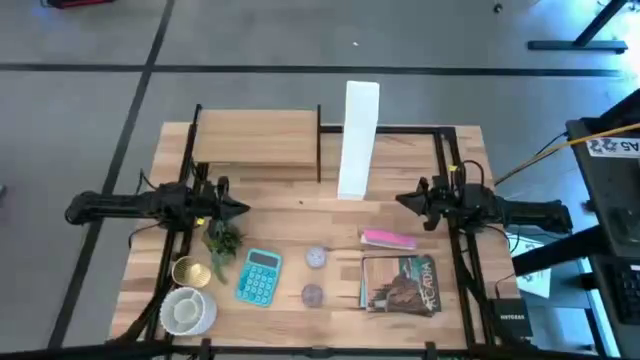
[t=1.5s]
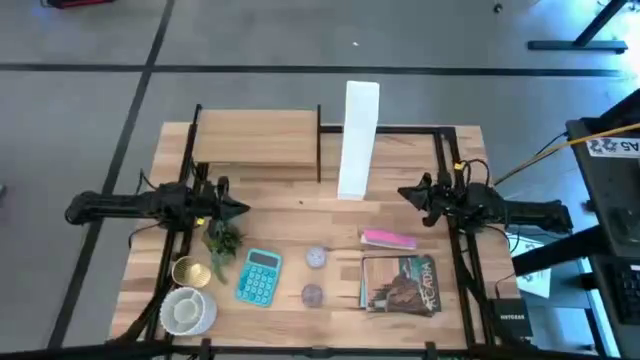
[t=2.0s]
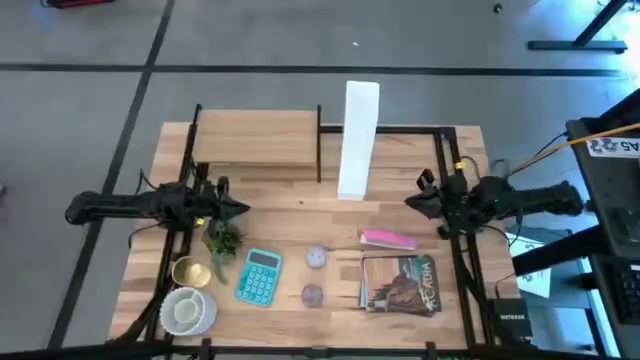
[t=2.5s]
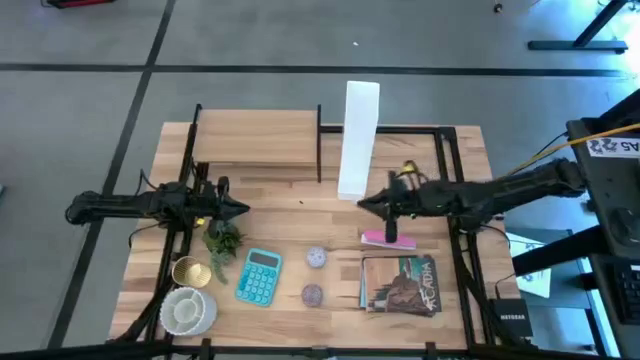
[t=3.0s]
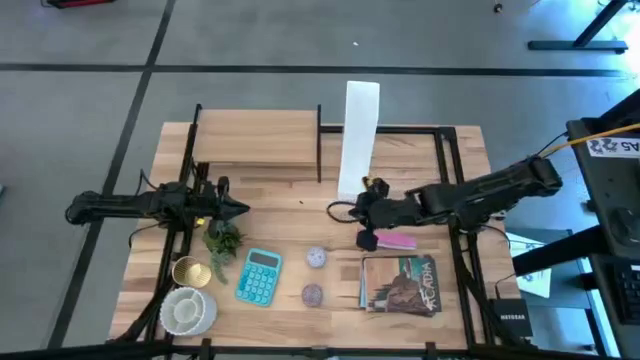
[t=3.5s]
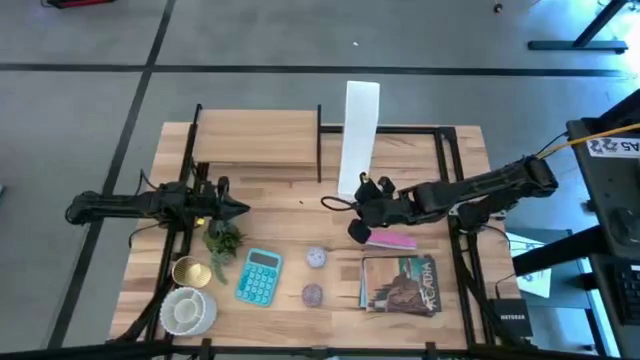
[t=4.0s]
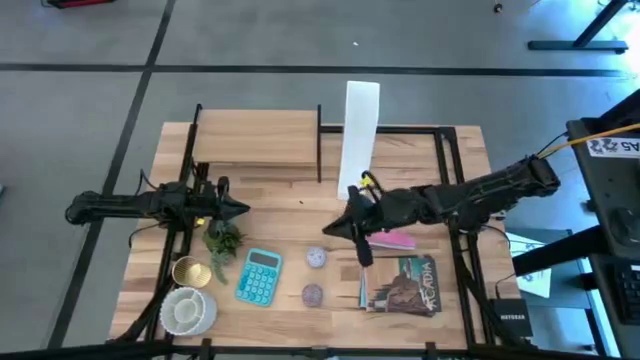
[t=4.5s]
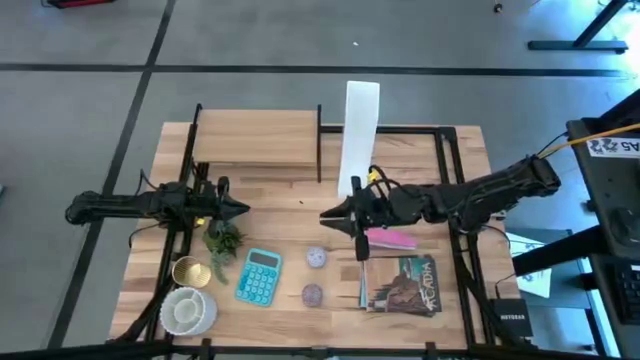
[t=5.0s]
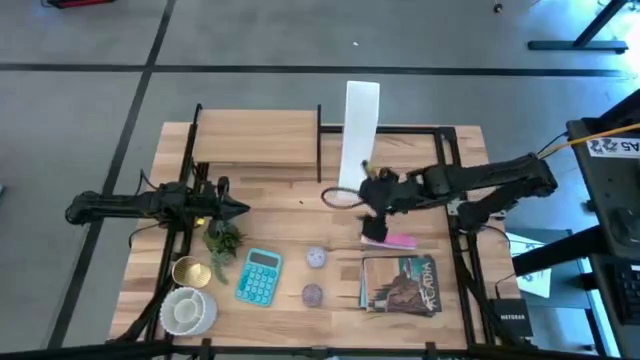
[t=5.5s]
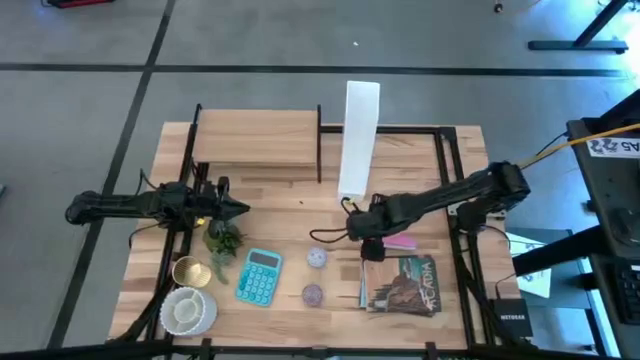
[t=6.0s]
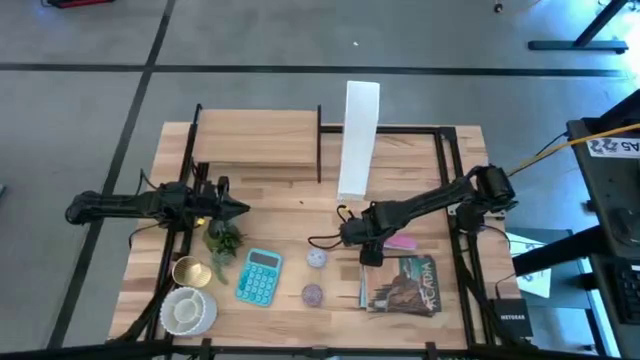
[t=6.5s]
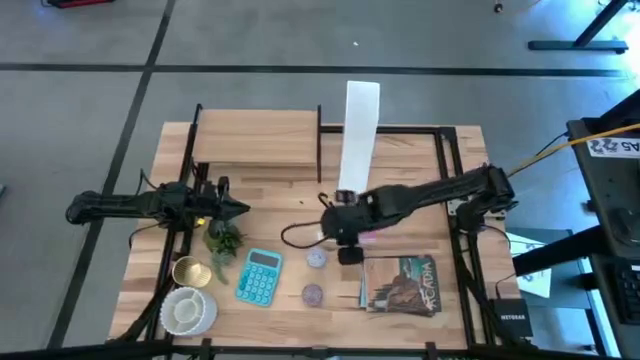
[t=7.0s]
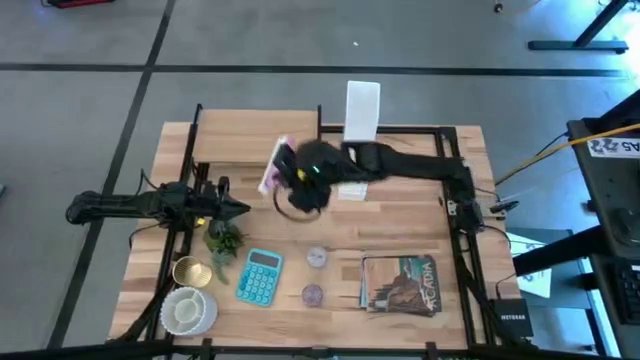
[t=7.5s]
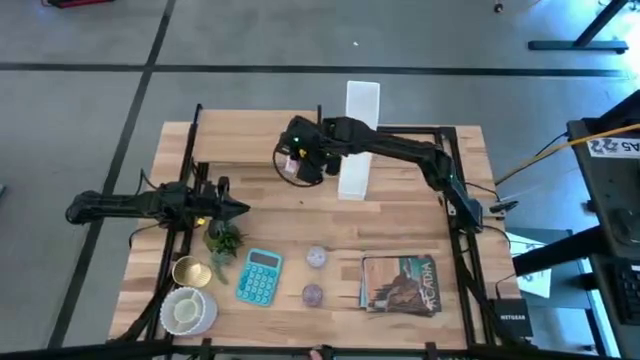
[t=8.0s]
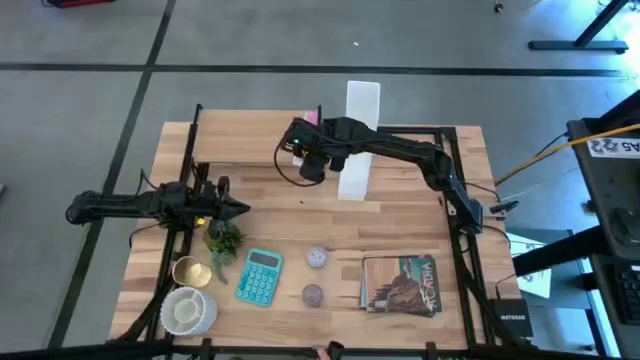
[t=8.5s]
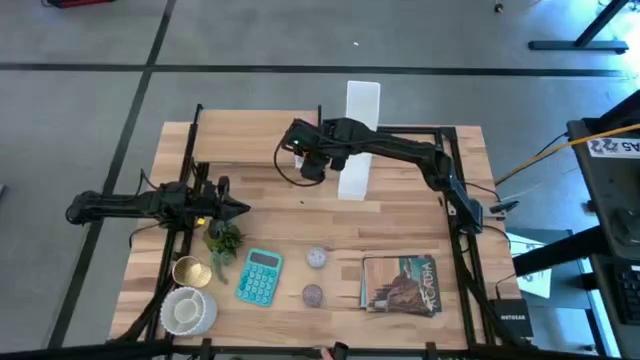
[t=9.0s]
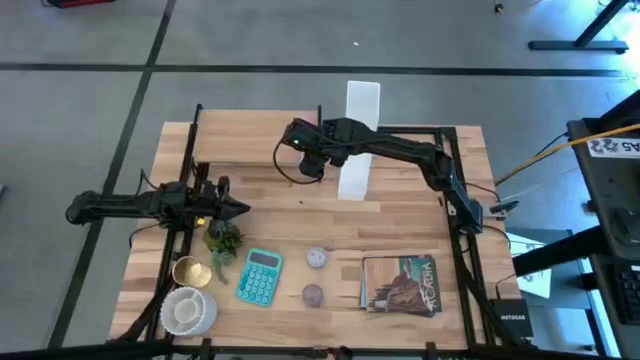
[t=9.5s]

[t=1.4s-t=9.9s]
Task: Stock shelves
Put the pink stapler on the shelf

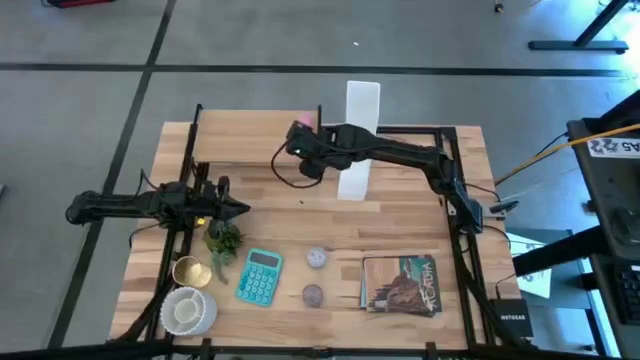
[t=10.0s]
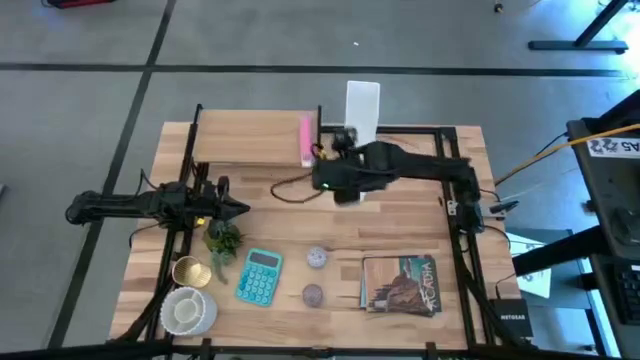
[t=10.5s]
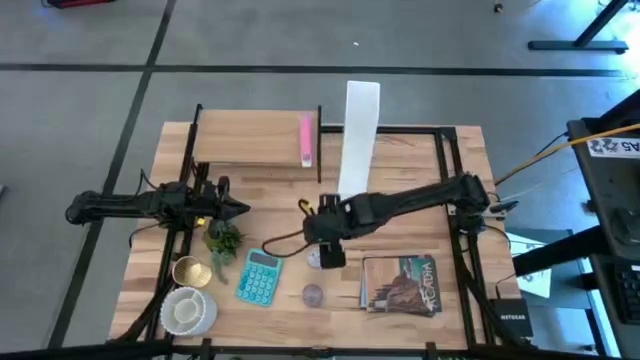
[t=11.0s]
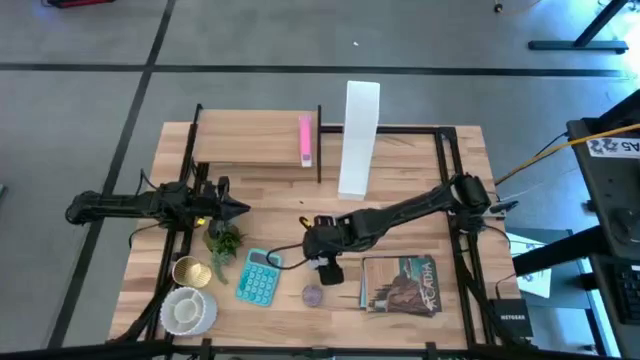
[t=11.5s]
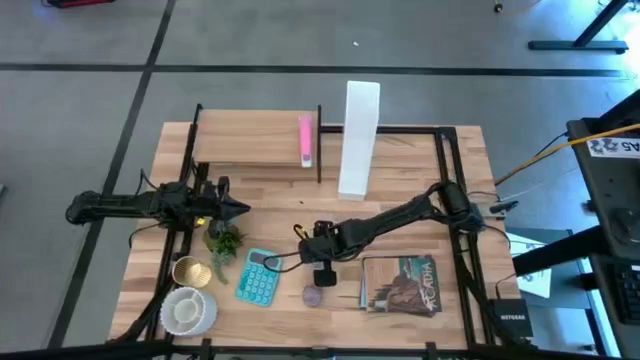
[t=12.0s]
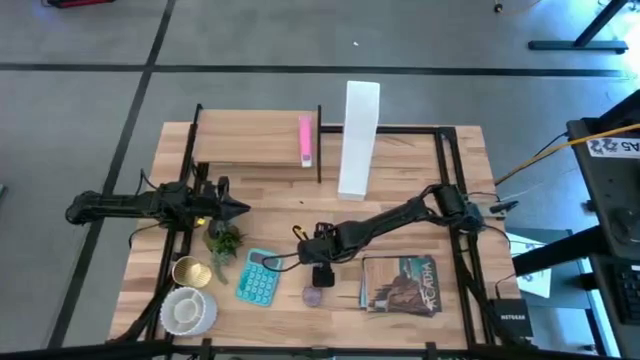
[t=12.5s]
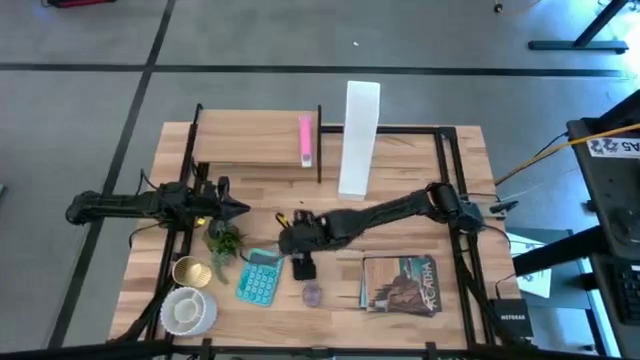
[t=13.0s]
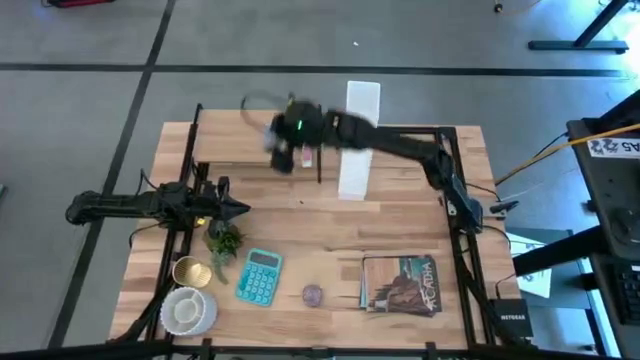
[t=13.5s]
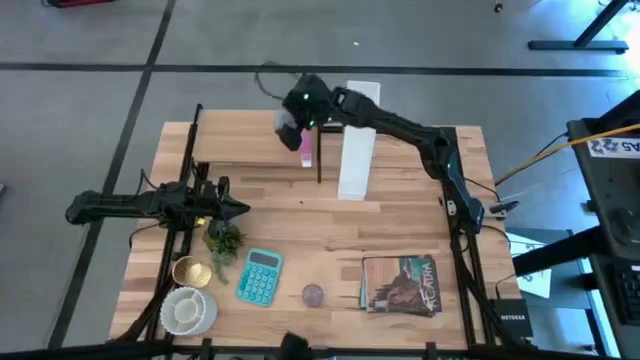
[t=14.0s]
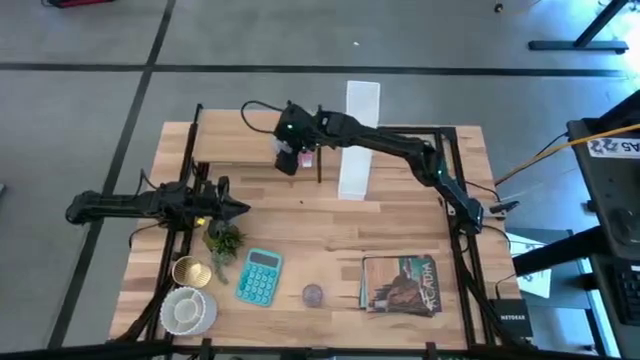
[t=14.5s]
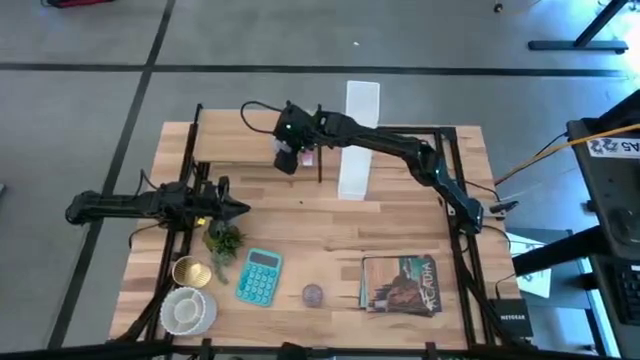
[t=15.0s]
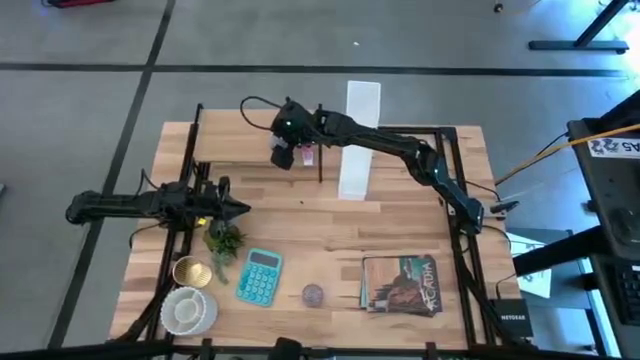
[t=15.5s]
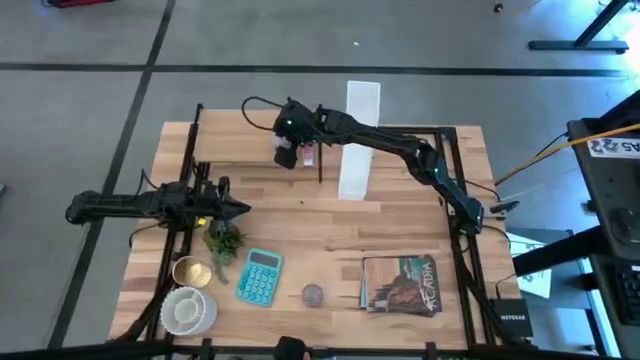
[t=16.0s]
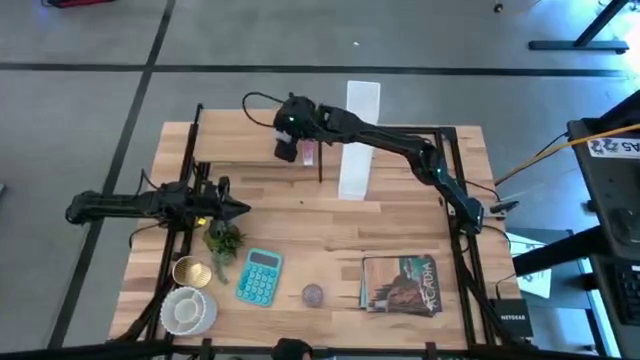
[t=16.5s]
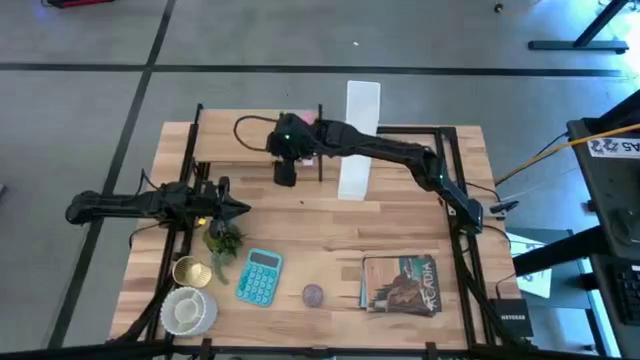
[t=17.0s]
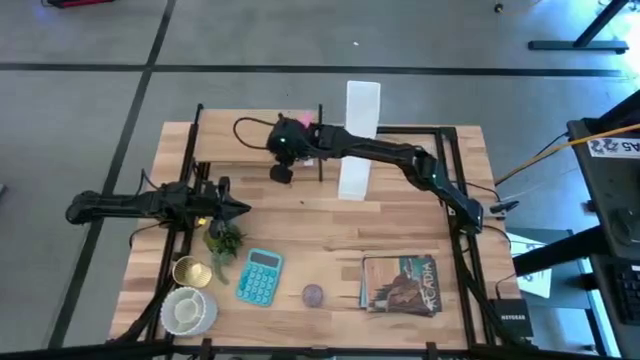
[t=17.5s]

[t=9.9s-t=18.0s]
Put the white patterned scented candle on the shelf

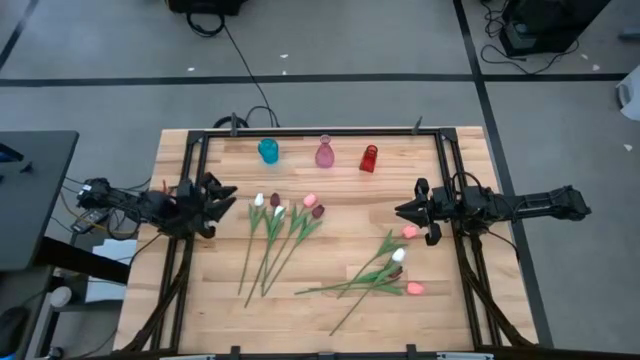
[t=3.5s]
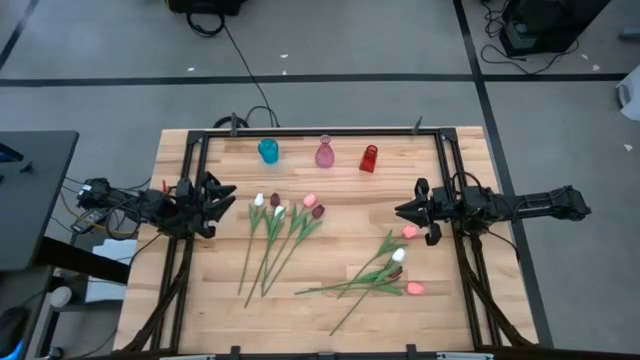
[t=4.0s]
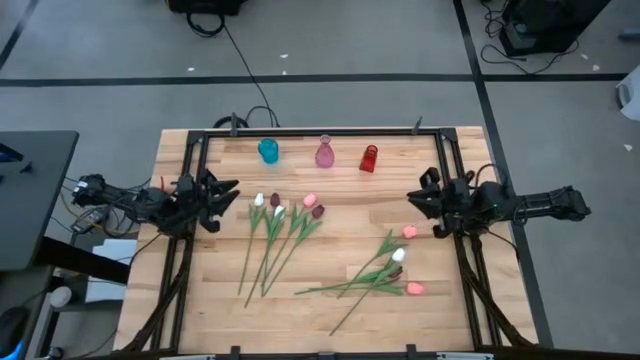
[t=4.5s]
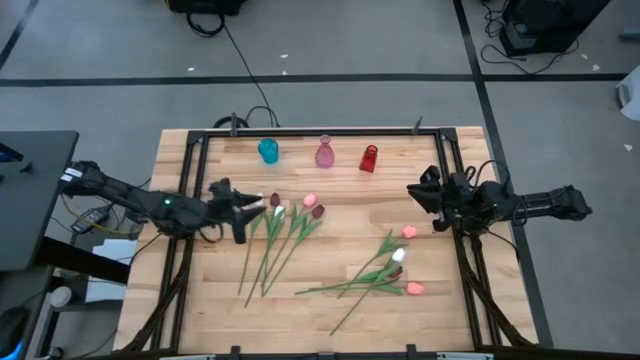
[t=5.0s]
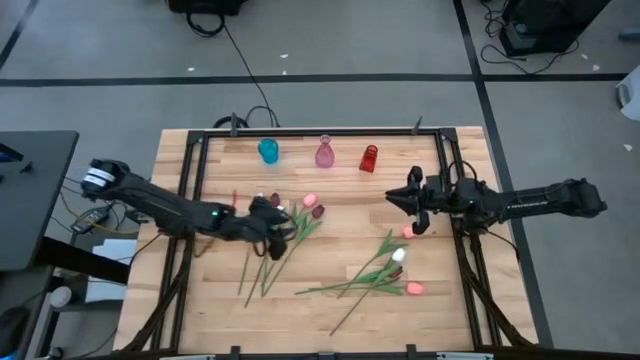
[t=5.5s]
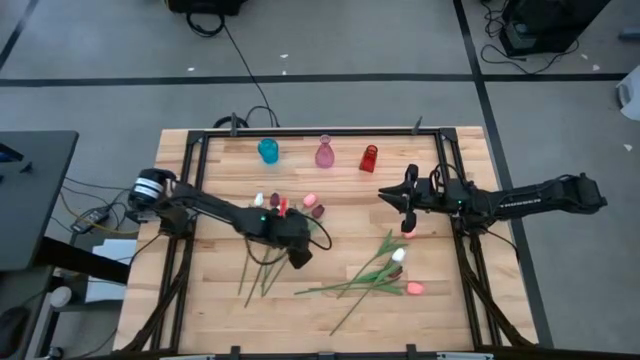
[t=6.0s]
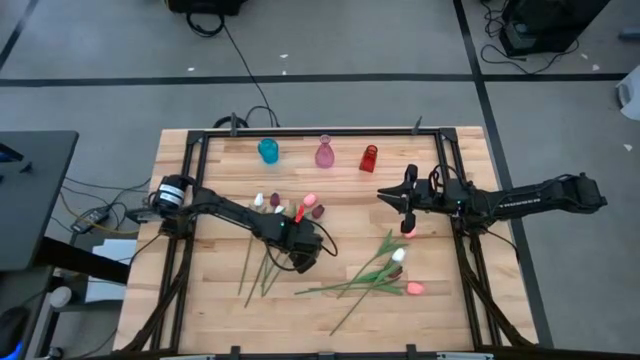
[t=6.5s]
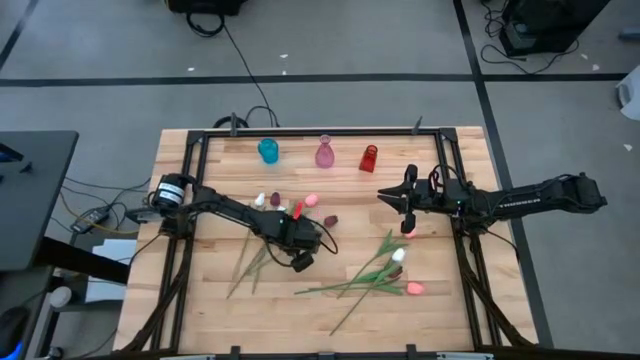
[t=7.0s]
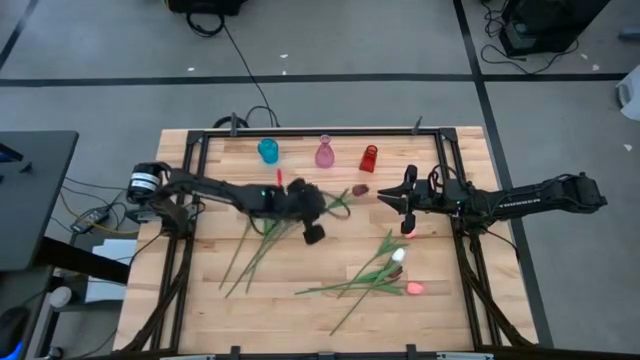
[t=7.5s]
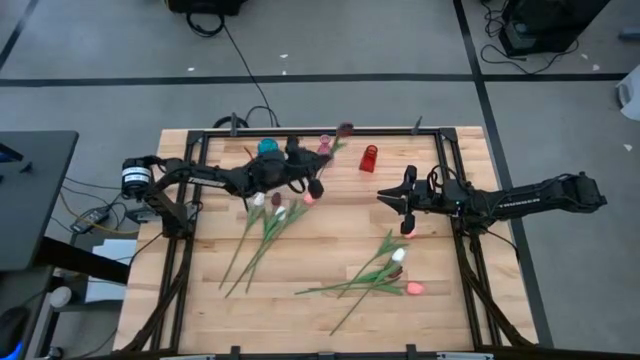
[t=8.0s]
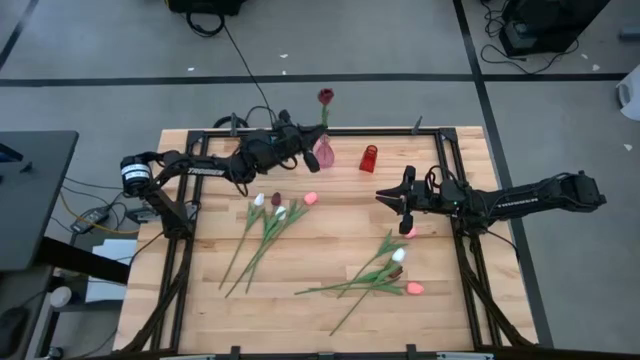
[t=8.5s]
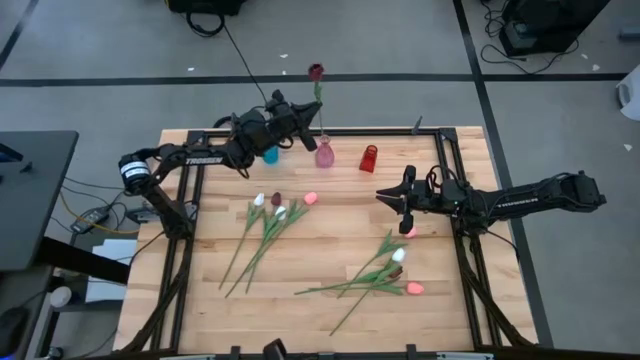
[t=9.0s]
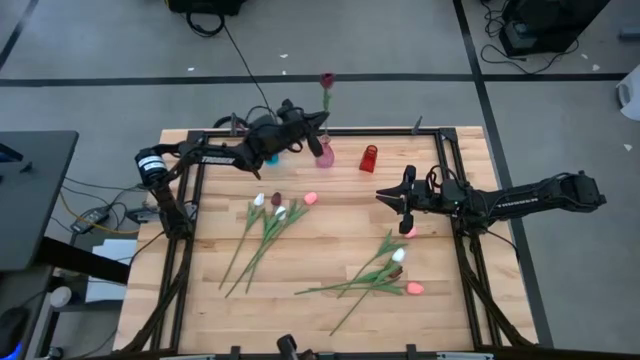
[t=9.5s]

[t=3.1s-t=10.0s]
Task: Sort flowers into vase by color
Put the top right dark red flower into the violet vase
